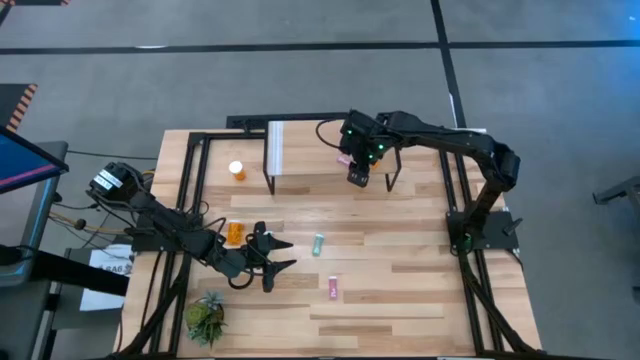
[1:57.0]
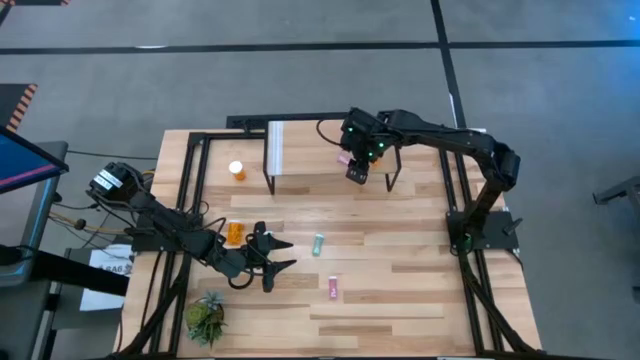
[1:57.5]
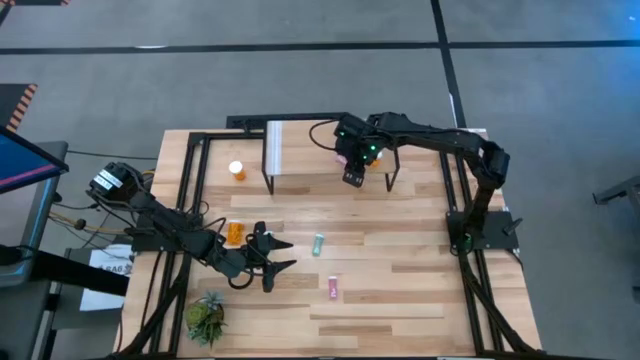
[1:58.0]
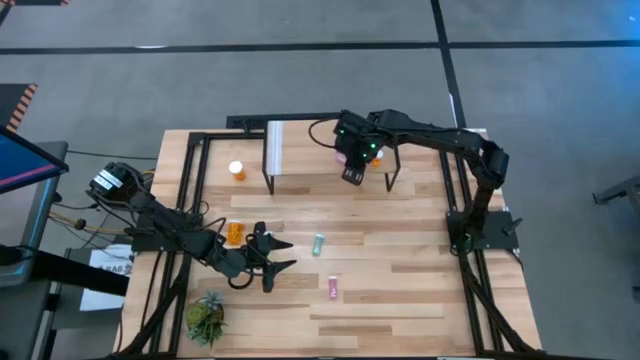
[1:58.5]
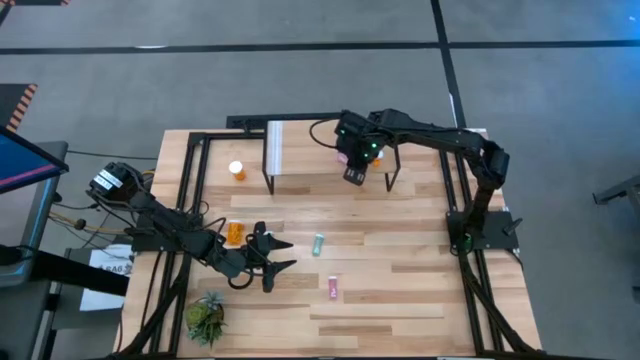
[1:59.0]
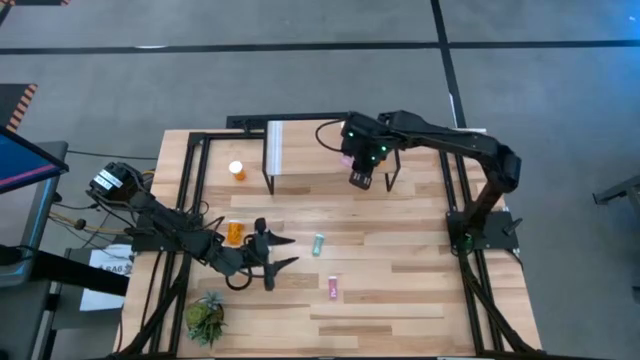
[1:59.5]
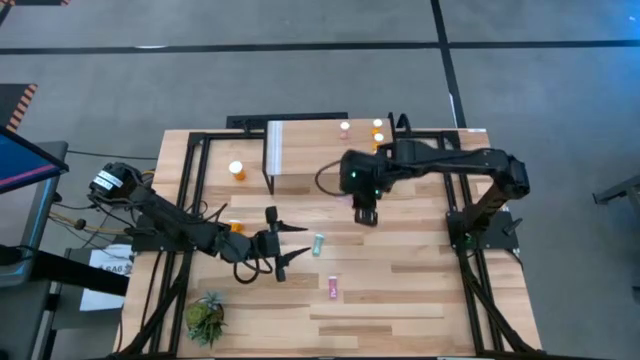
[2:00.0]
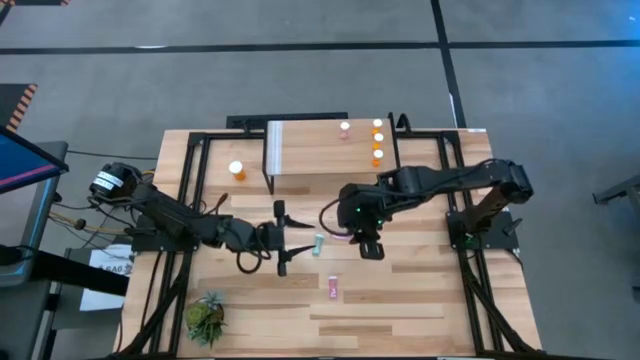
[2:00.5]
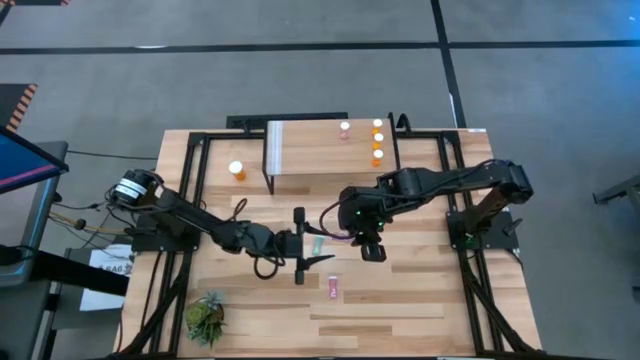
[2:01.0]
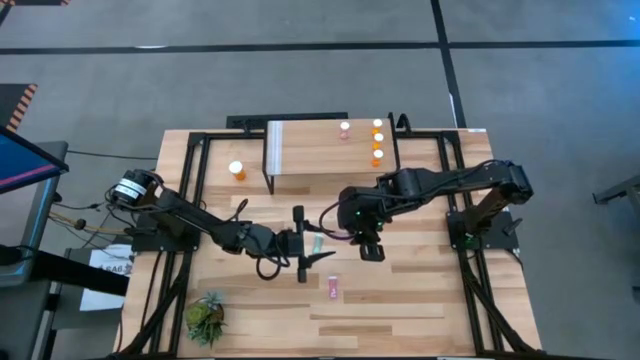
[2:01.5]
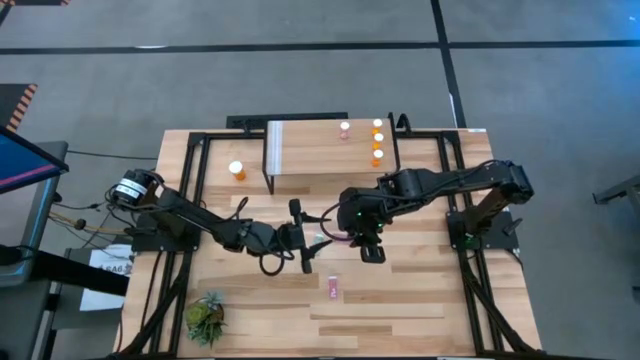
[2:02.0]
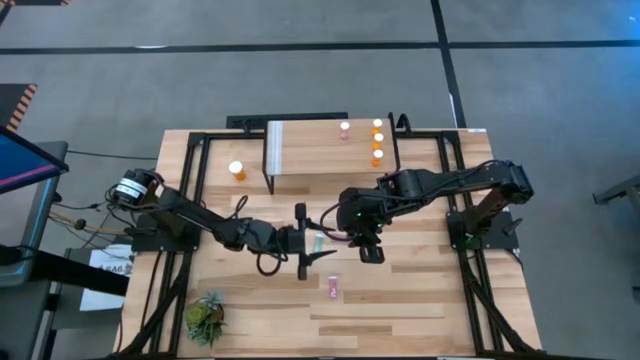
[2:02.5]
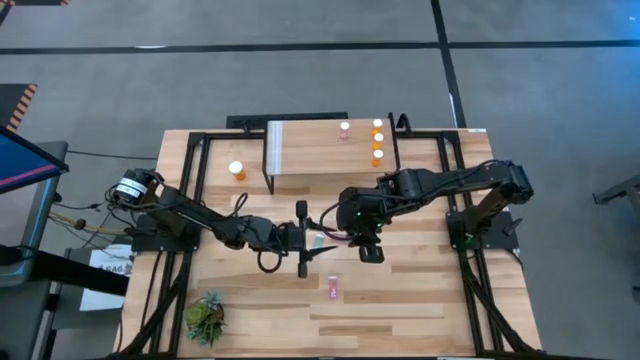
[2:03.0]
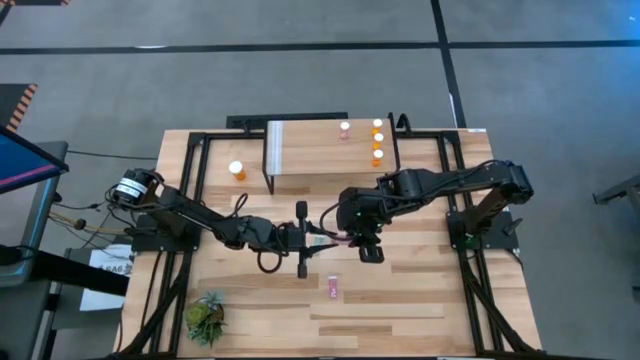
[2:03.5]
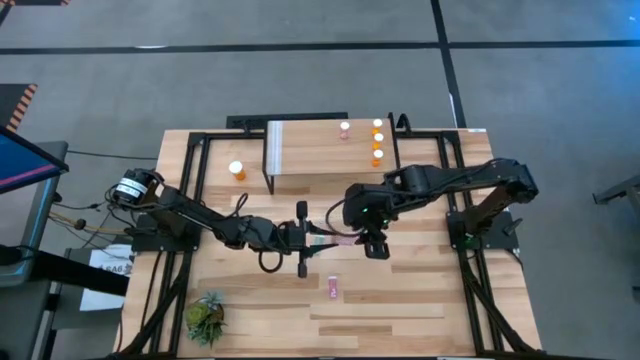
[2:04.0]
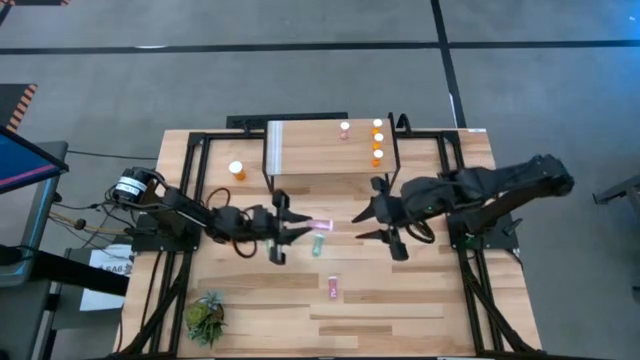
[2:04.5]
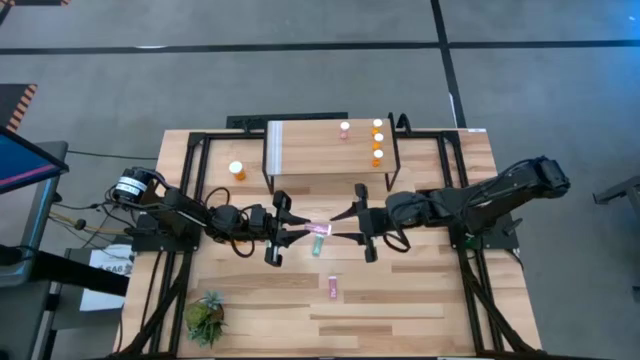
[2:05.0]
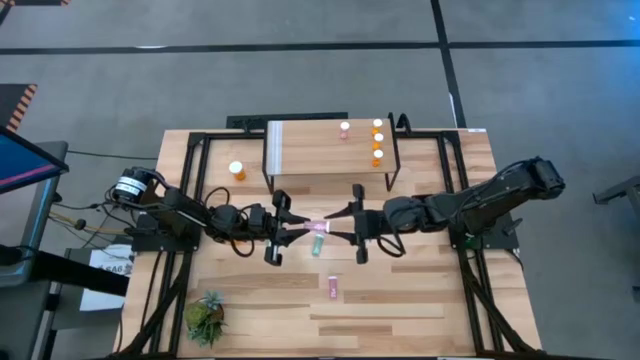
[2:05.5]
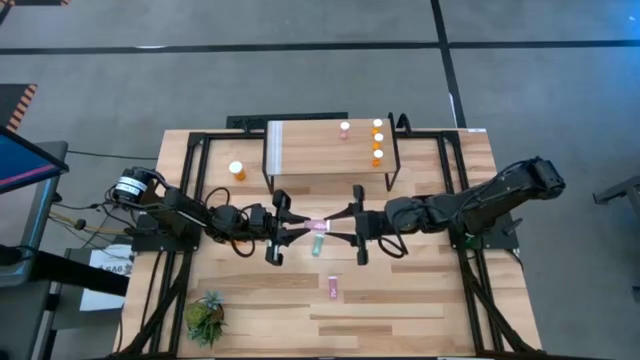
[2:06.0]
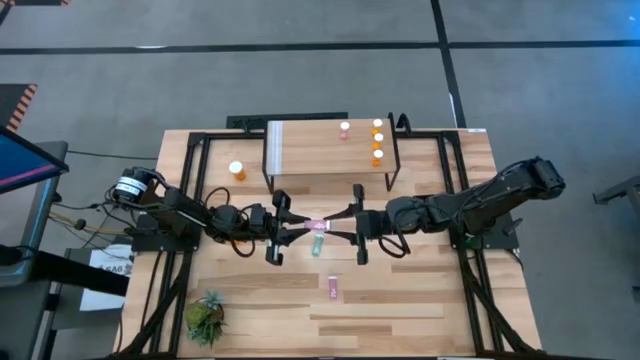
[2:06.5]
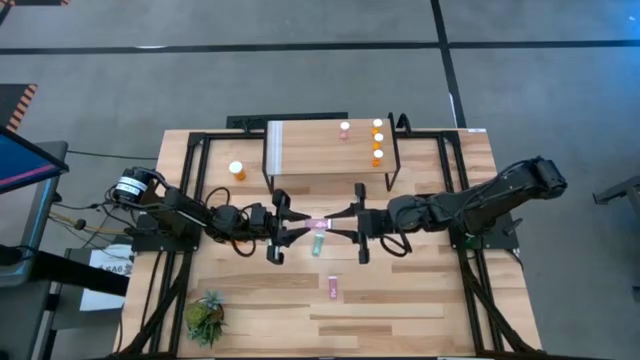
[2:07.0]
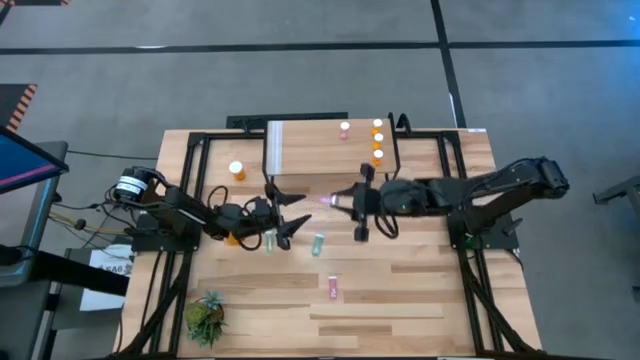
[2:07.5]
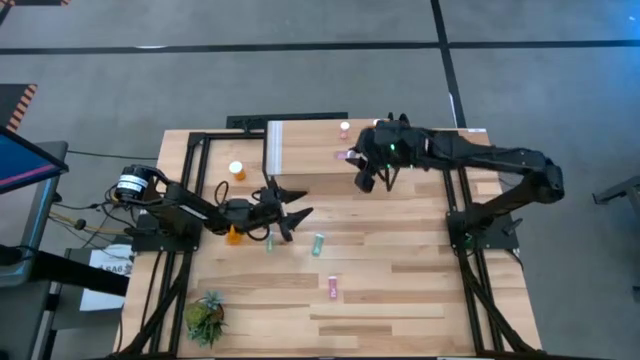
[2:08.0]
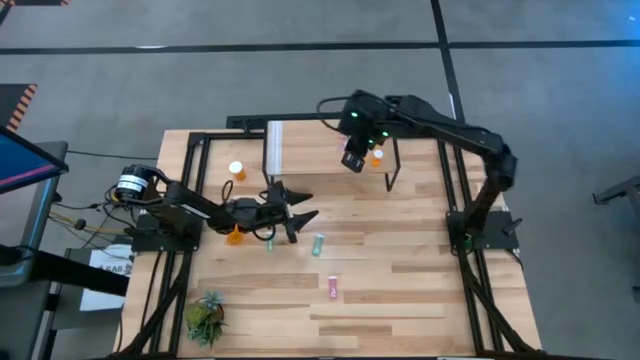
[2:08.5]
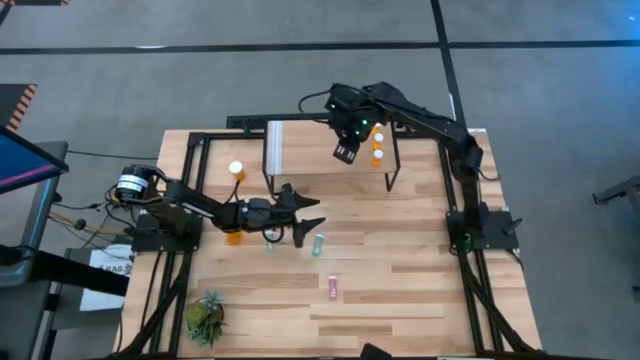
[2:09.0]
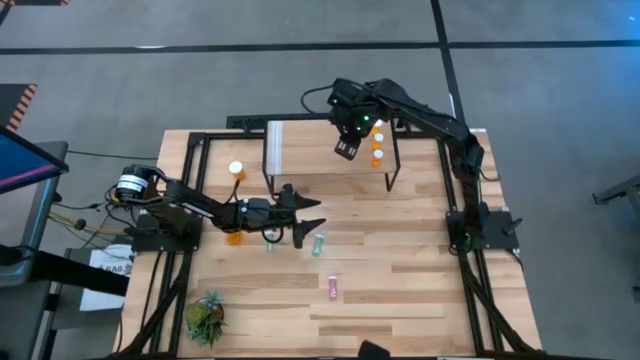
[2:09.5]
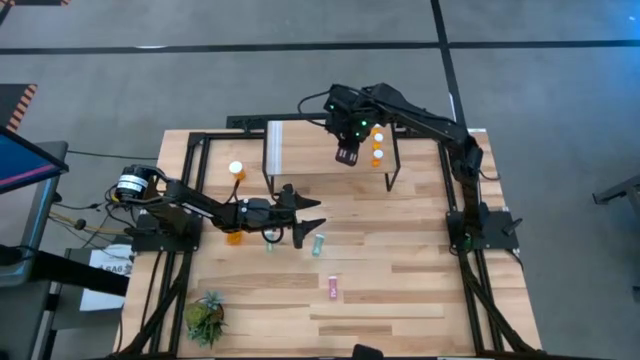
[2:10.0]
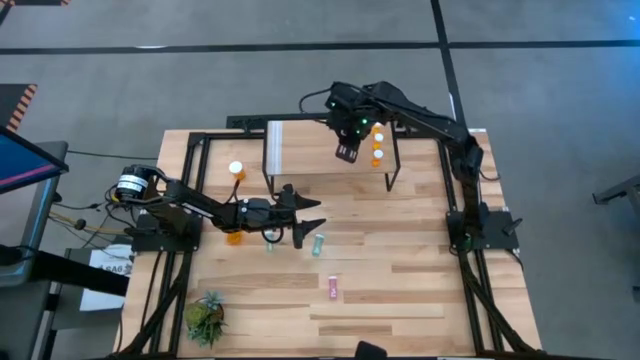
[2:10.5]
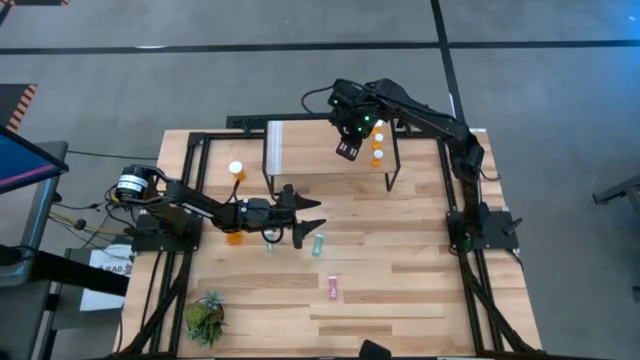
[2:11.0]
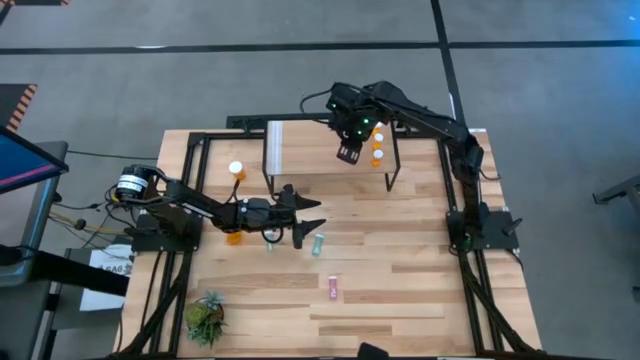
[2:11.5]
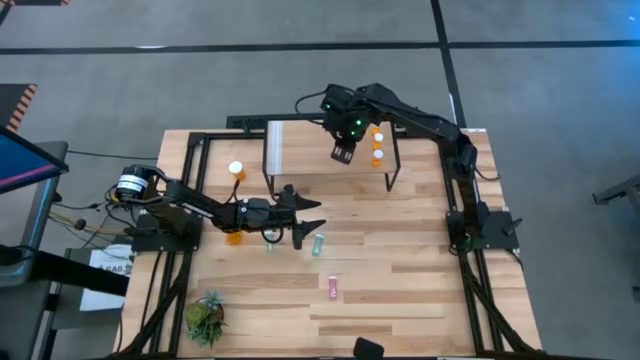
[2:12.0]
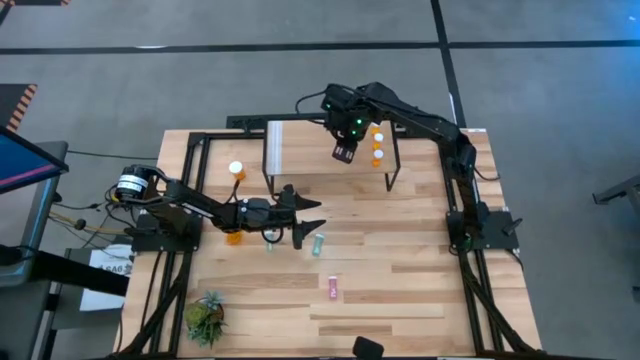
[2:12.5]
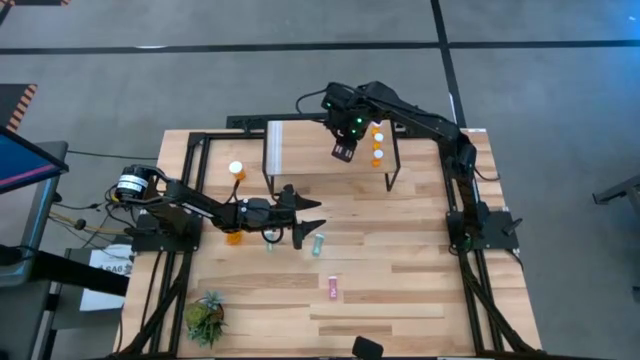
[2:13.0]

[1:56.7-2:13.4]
Task: Pick and place medicine bottles onto shelf by color
Put the pink pill bottle on the shelf

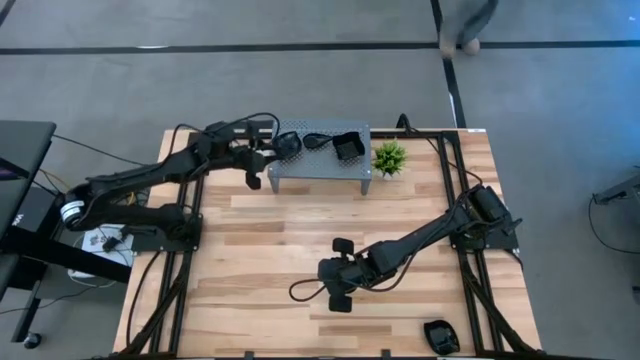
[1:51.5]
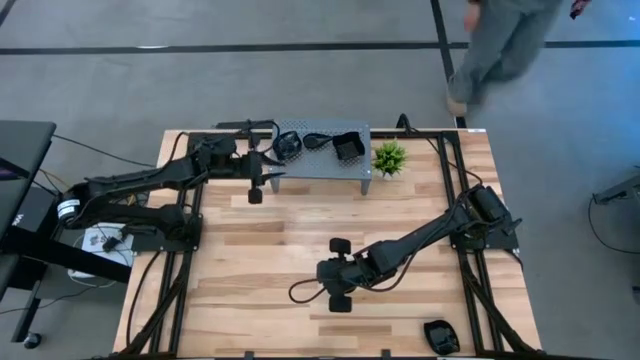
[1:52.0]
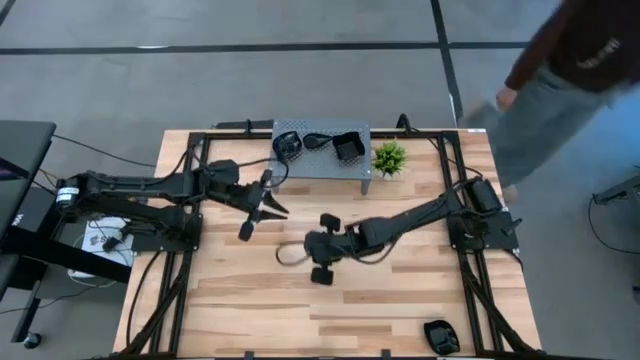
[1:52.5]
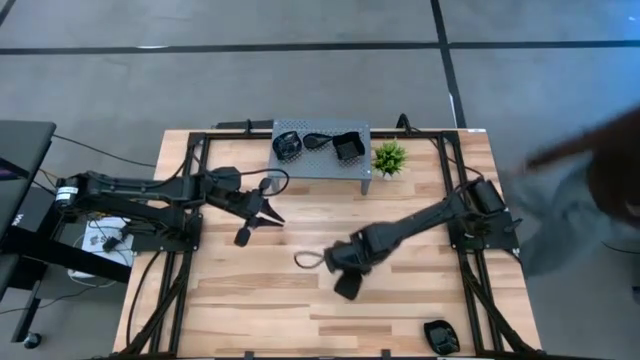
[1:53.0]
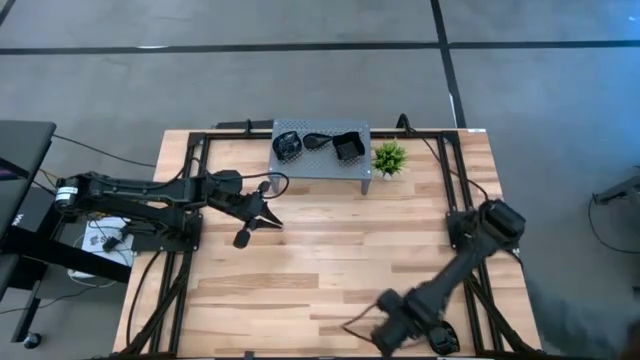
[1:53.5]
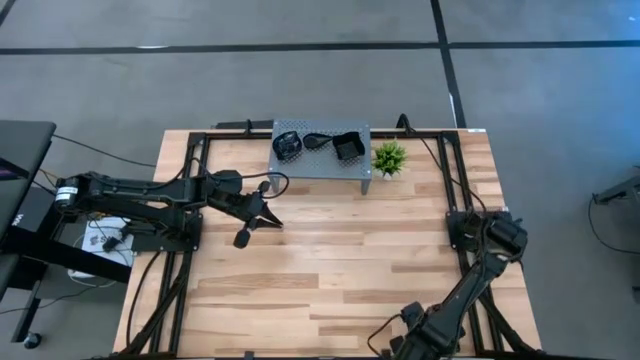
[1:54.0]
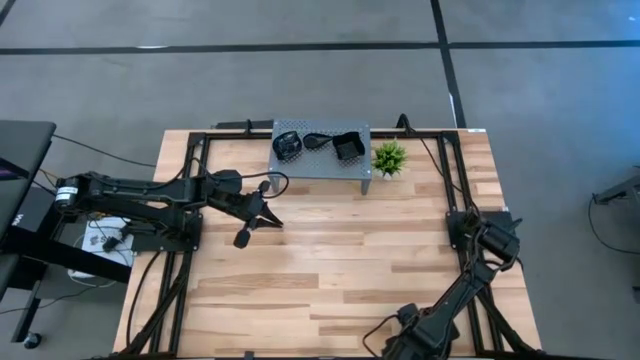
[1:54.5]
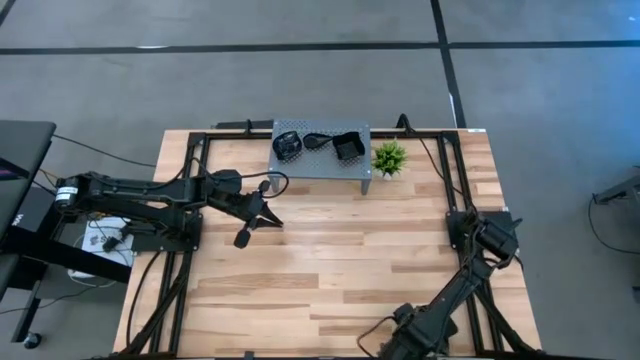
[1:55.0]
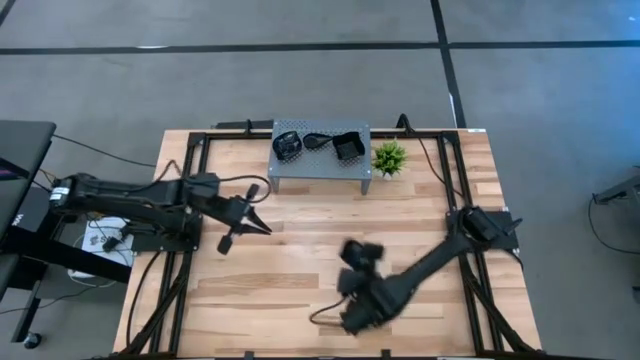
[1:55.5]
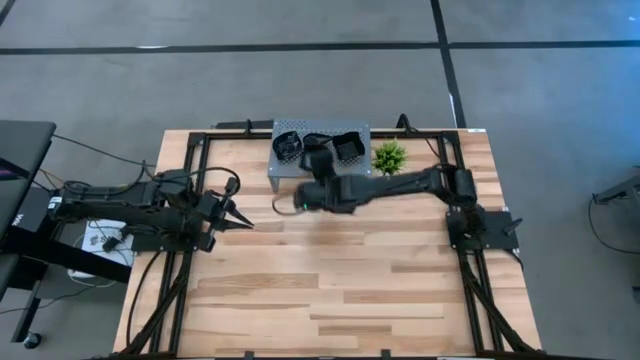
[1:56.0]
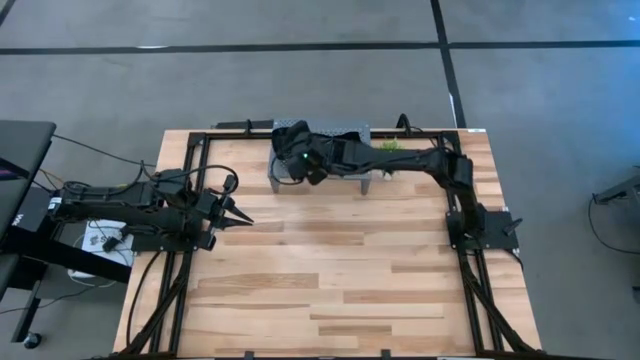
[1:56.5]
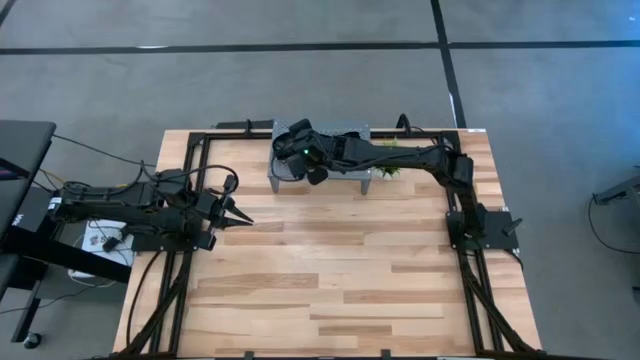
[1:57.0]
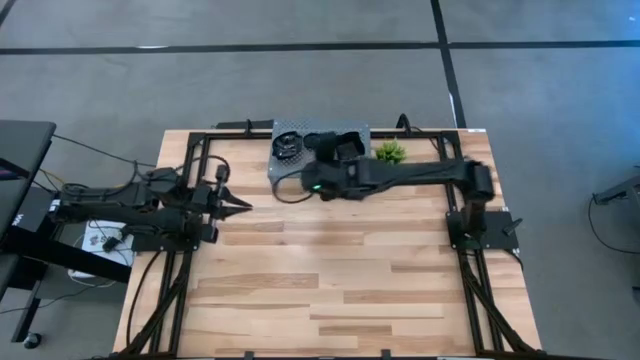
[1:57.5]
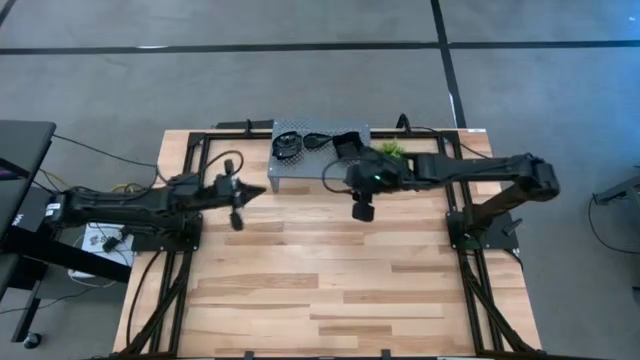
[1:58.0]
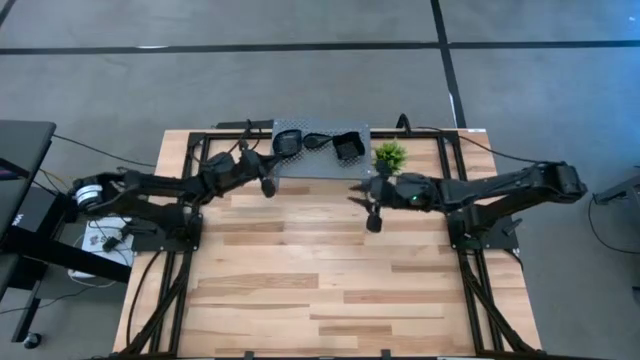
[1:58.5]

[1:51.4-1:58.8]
Task: Pick & Place Mini shaped plates
Stack the leaf-shaped plate on top of the leaf-shaped plate on the shelf
